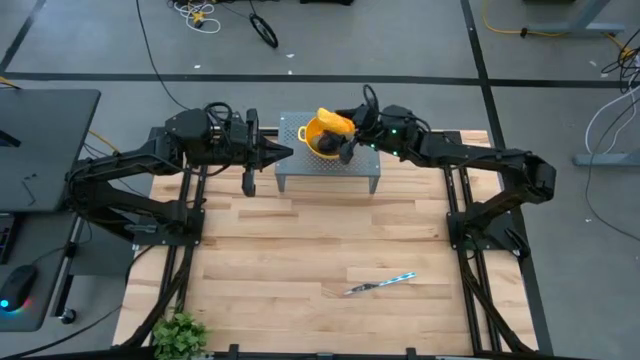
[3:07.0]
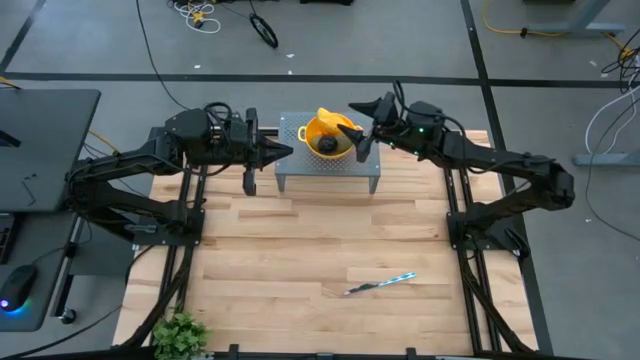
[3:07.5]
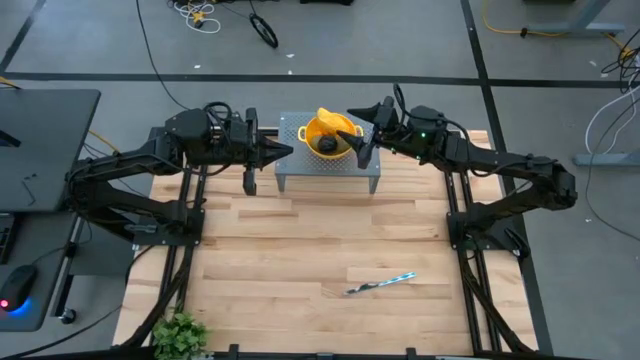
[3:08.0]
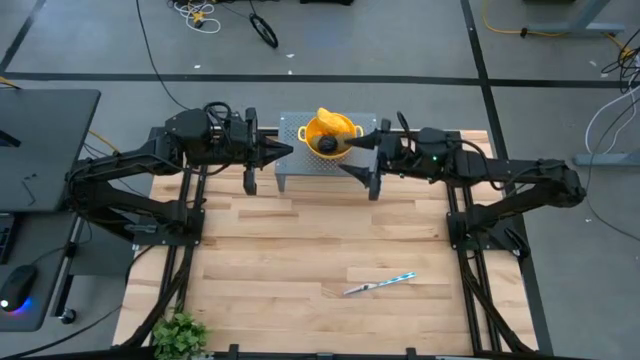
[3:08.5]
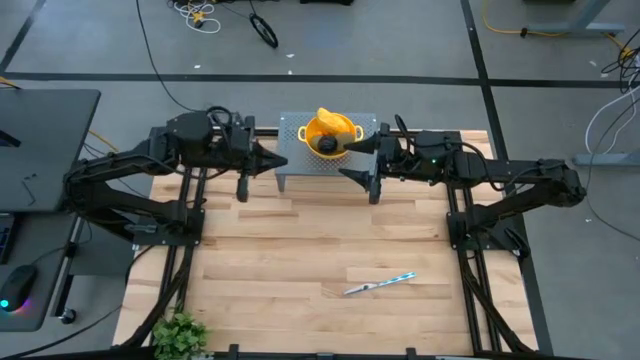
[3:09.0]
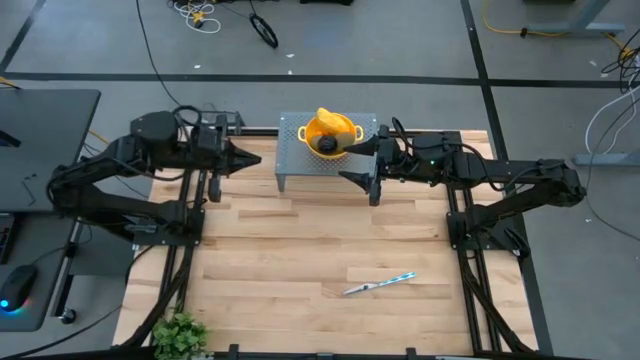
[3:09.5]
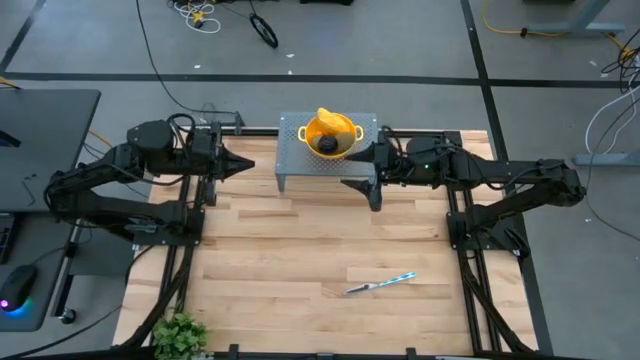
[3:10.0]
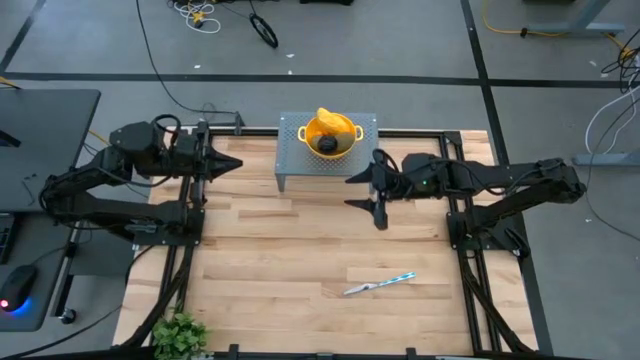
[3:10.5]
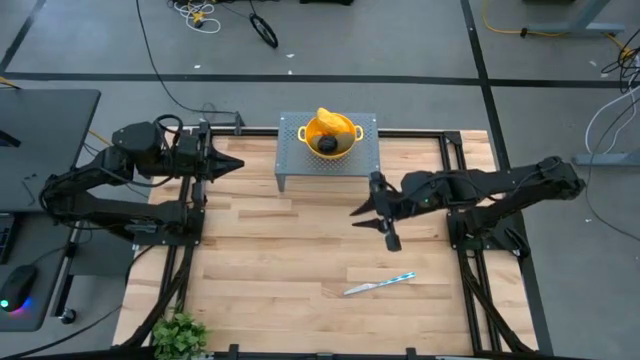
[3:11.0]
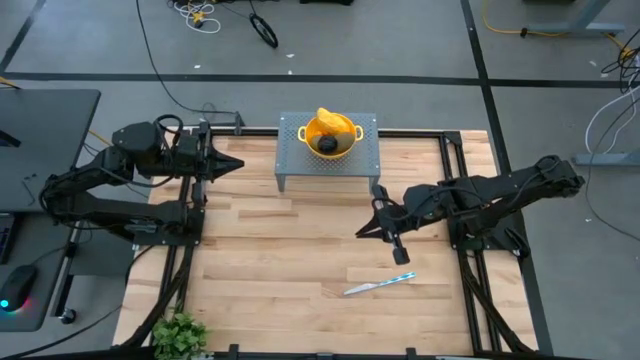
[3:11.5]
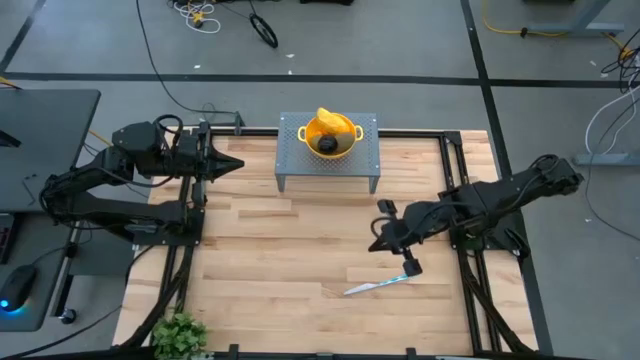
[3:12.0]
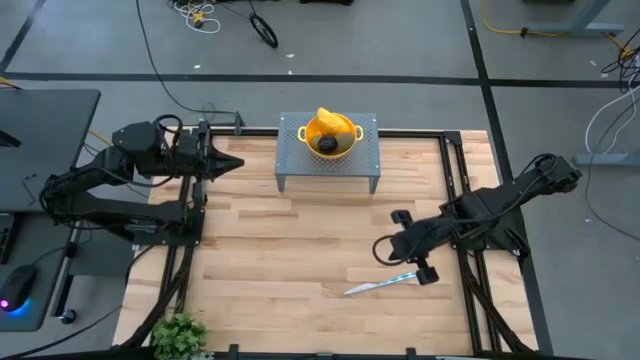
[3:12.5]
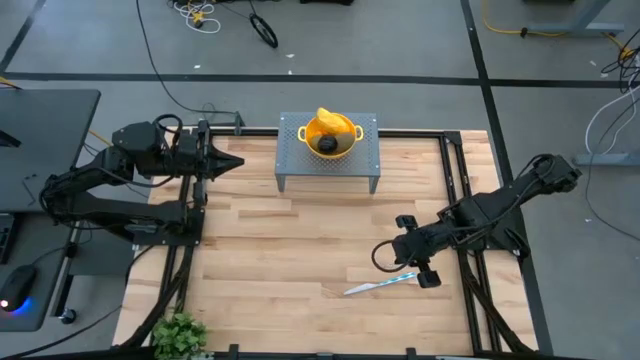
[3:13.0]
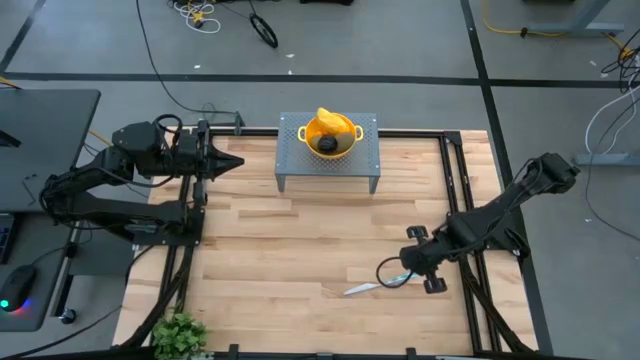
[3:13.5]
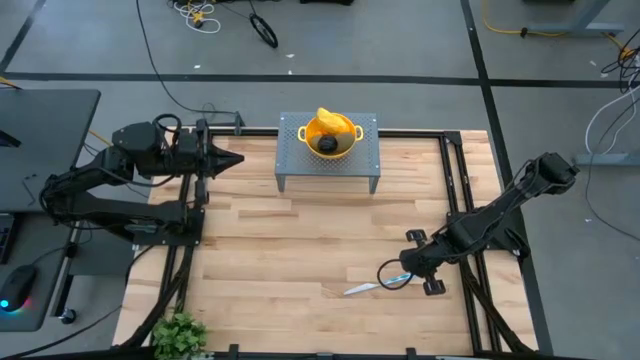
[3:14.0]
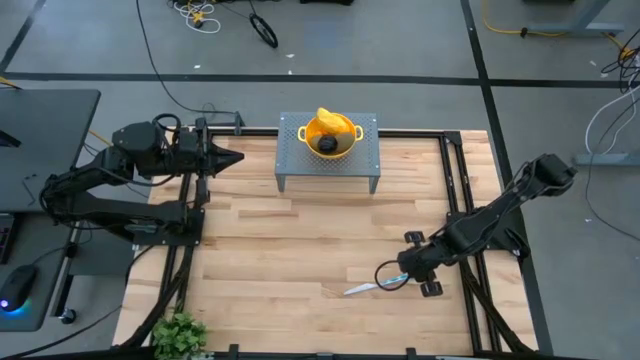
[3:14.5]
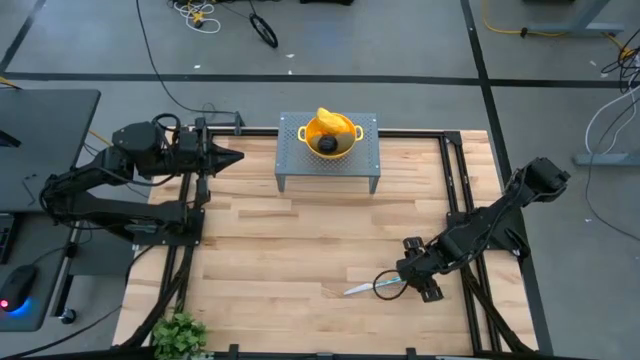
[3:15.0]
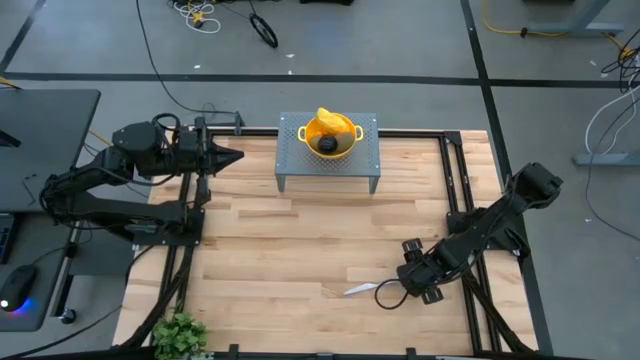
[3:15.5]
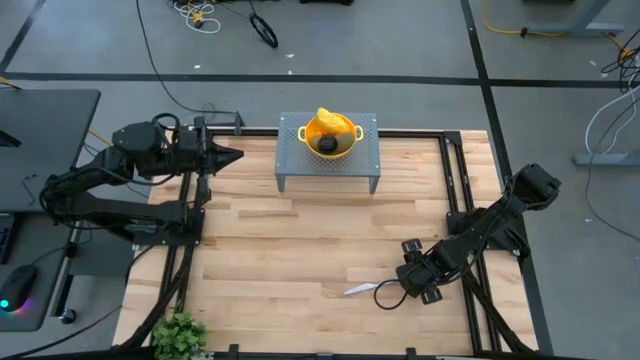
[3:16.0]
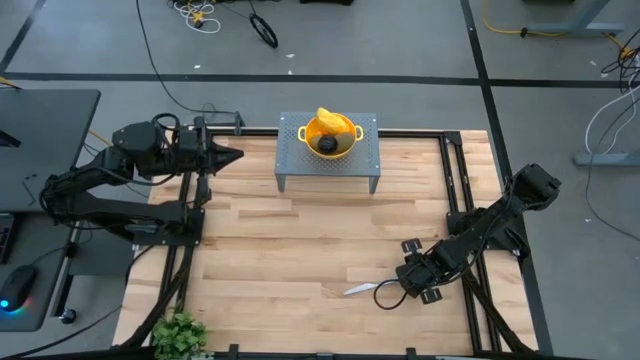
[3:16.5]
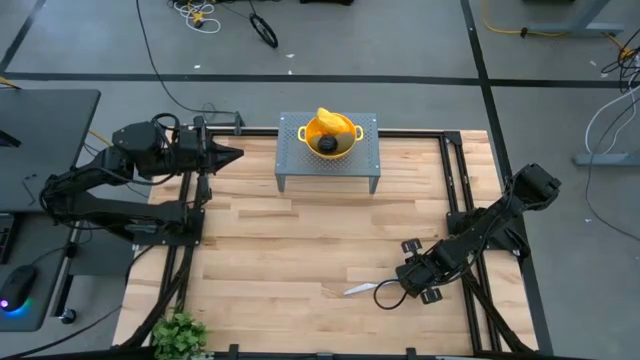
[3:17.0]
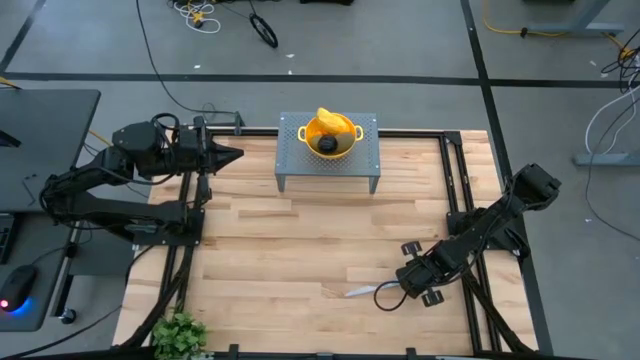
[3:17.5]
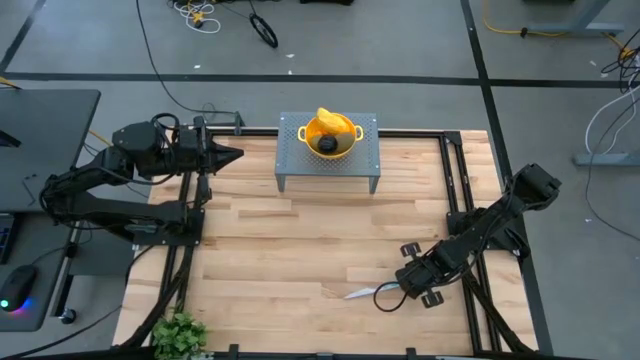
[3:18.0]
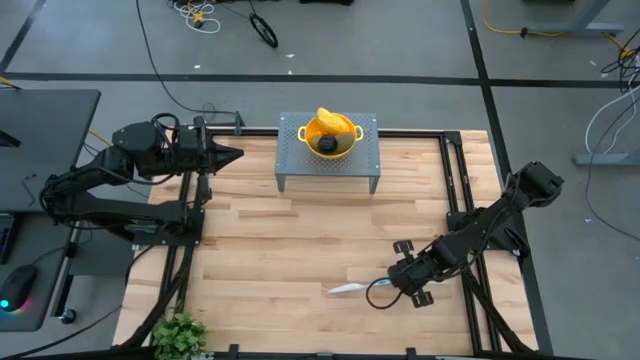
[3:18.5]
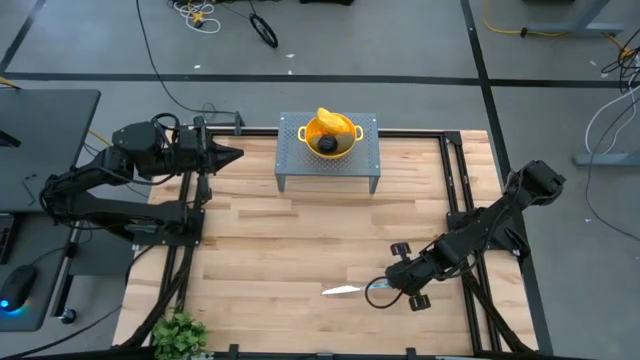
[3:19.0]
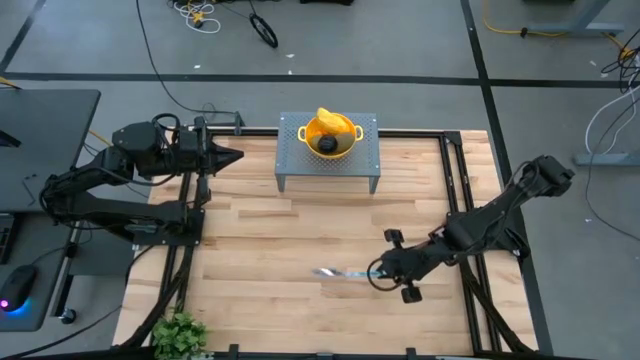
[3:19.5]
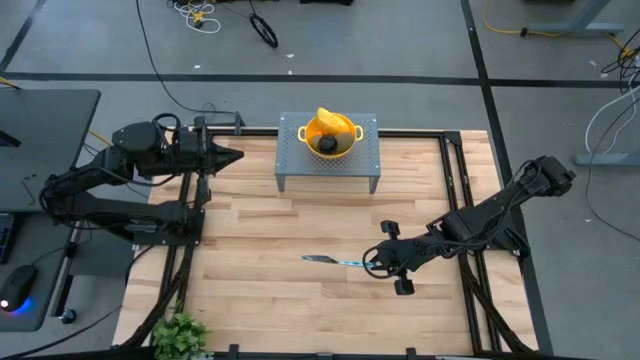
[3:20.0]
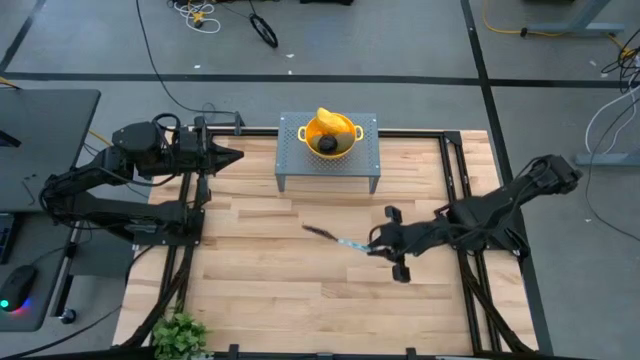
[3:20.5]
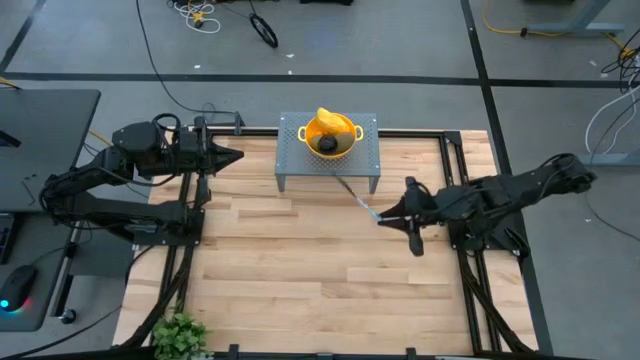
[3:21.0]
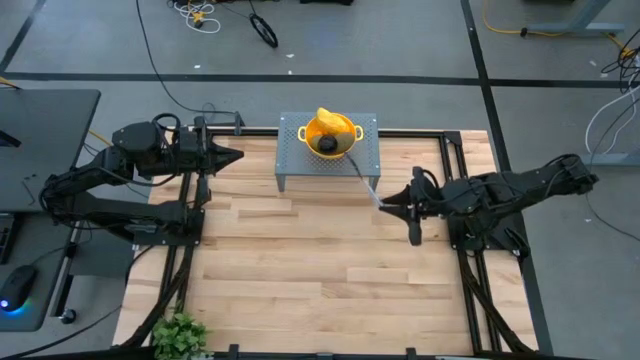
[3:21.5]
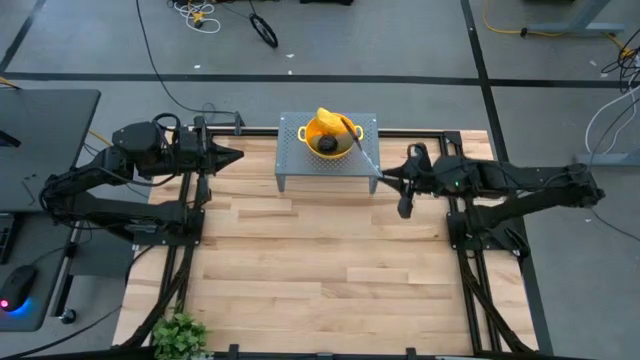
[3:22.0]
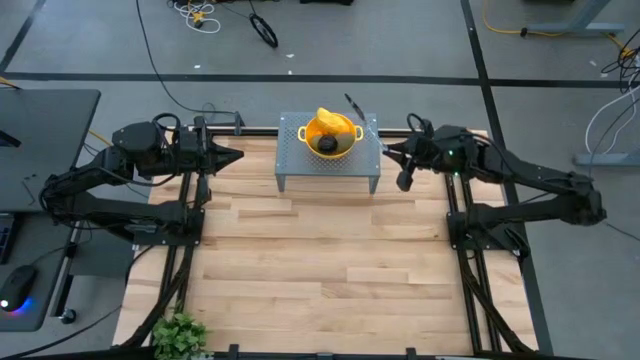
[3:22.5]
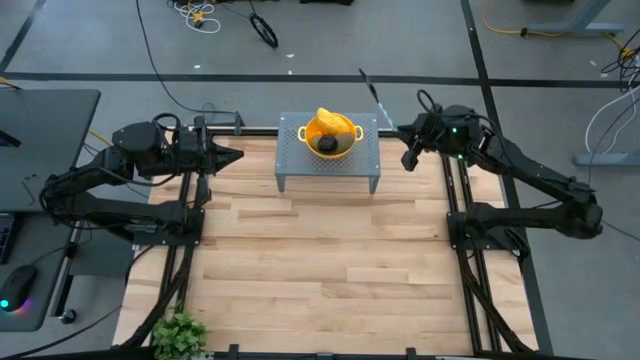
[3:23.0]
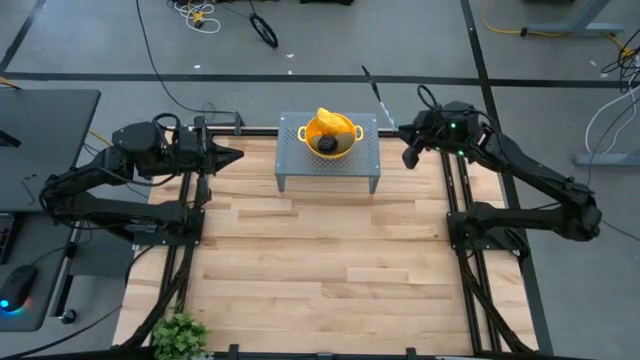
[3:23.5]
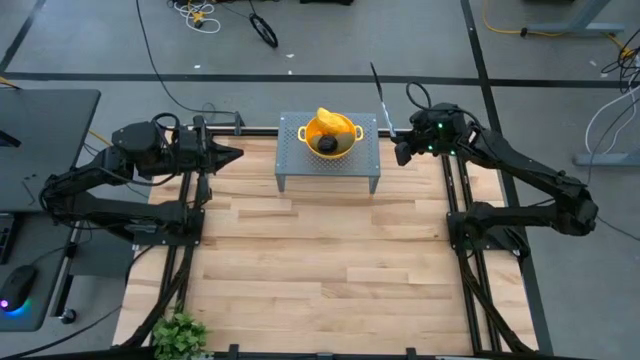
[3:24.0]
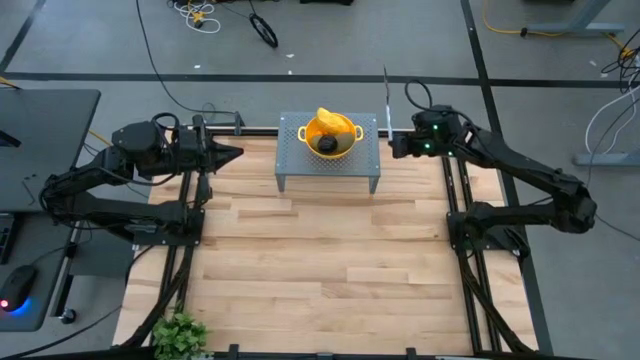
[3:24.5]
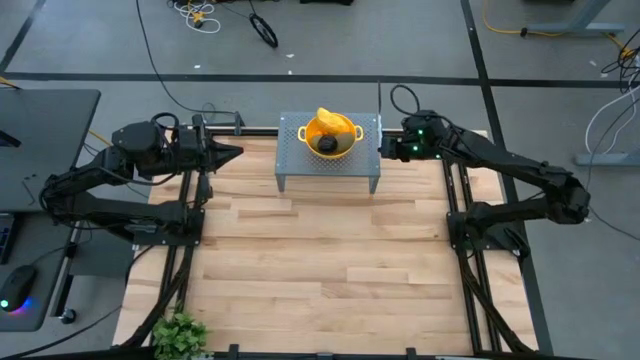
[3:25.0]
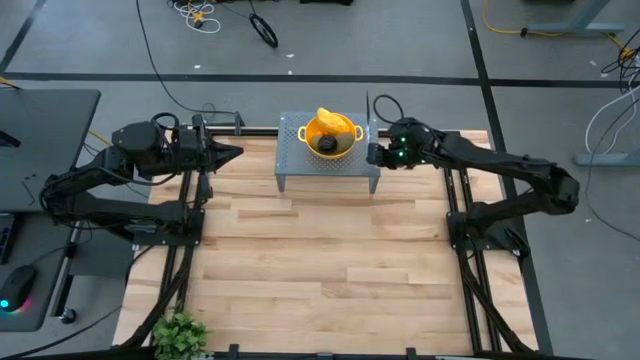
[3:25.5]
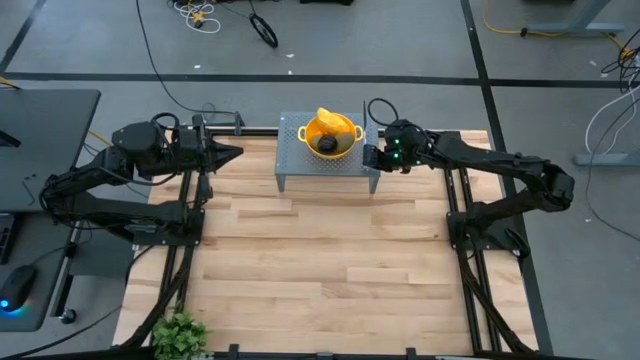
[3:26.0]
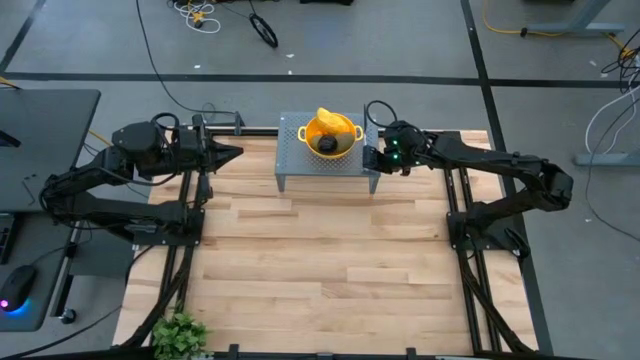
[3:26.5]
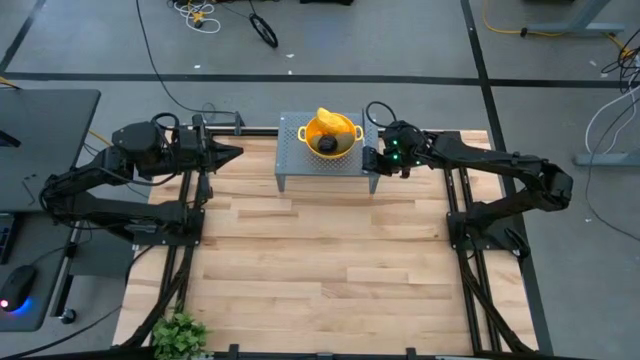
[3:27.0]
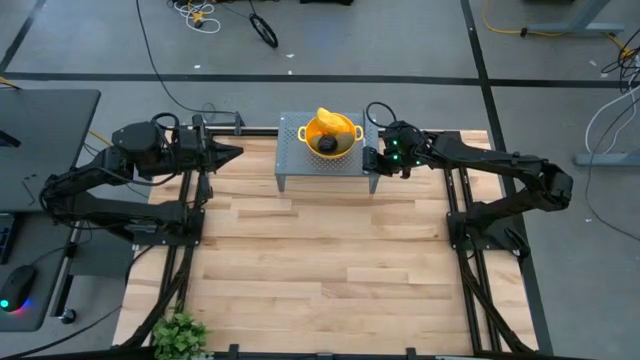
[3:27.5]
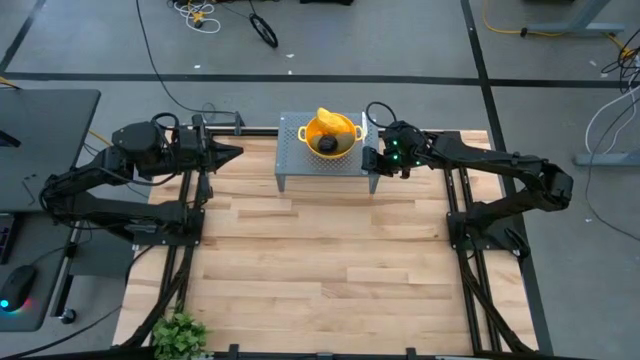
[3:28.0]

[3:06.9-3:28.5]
Task: Pick & Place Fruit
Put the blue patterned knife on the shelf to the right of the yellow strainer bowl
